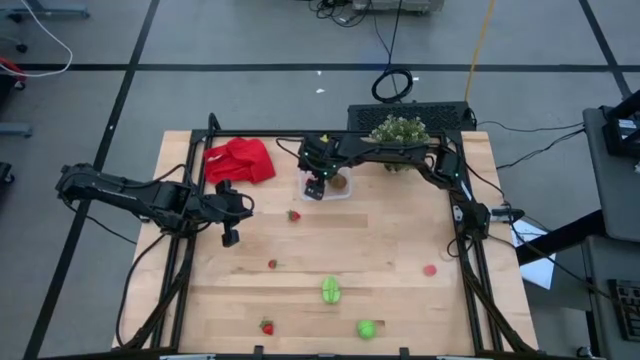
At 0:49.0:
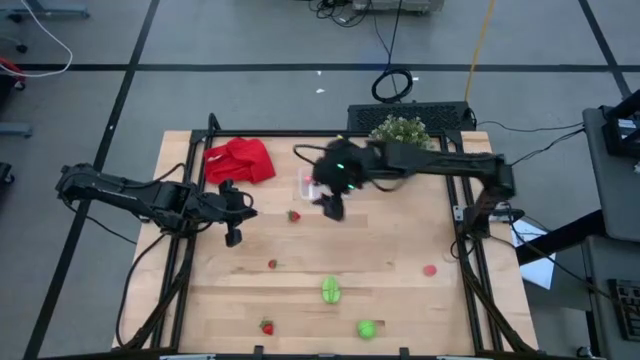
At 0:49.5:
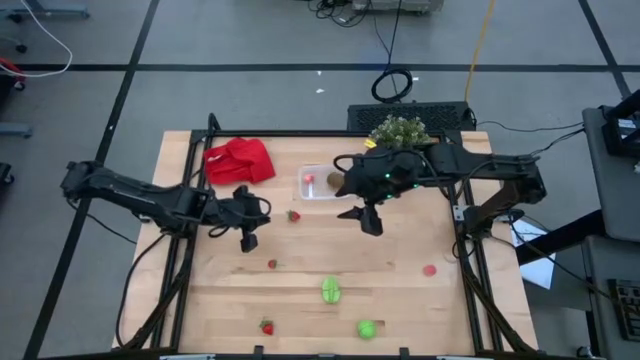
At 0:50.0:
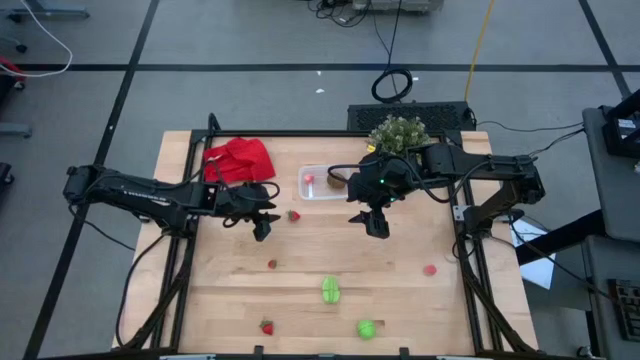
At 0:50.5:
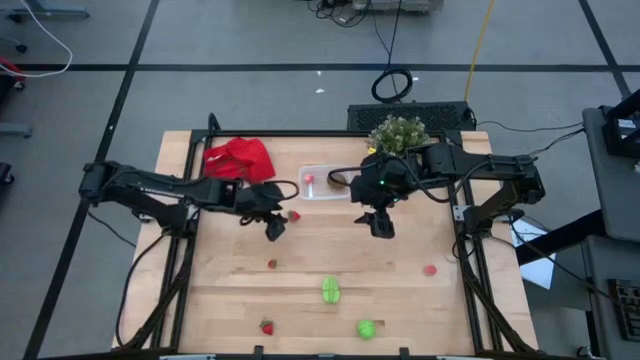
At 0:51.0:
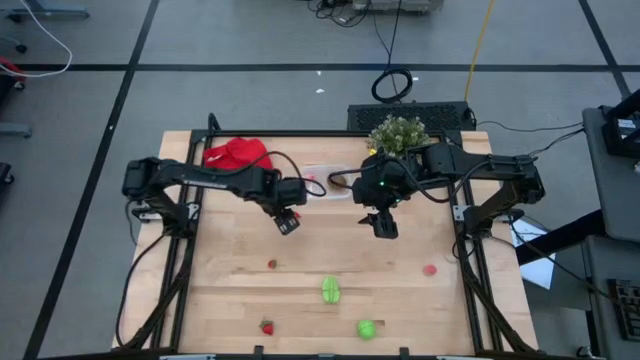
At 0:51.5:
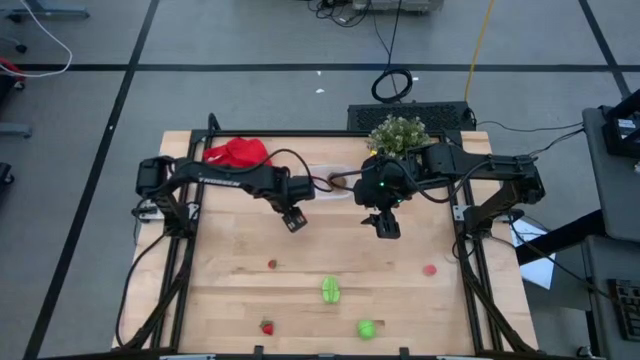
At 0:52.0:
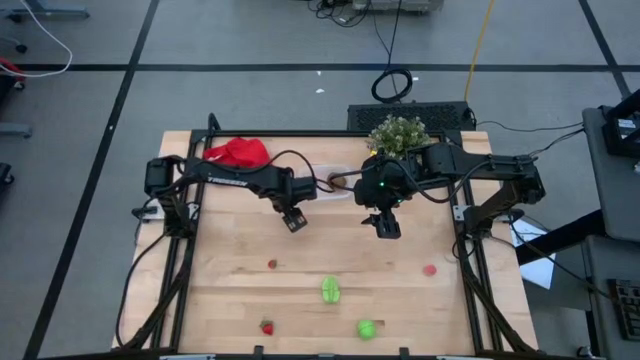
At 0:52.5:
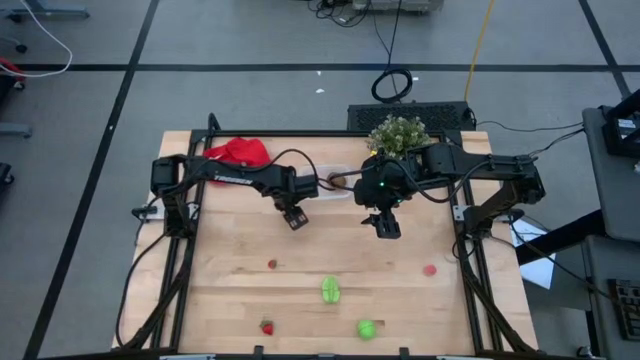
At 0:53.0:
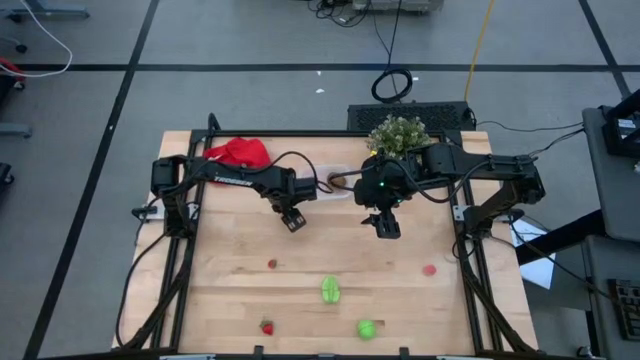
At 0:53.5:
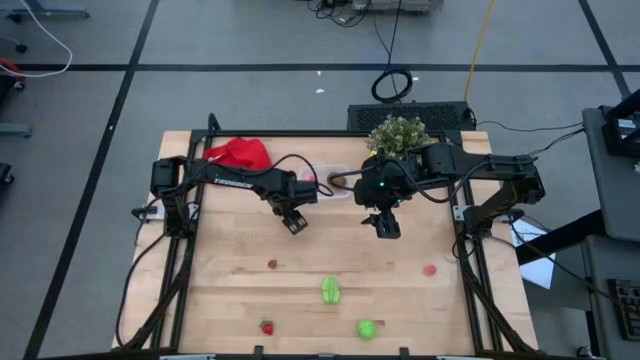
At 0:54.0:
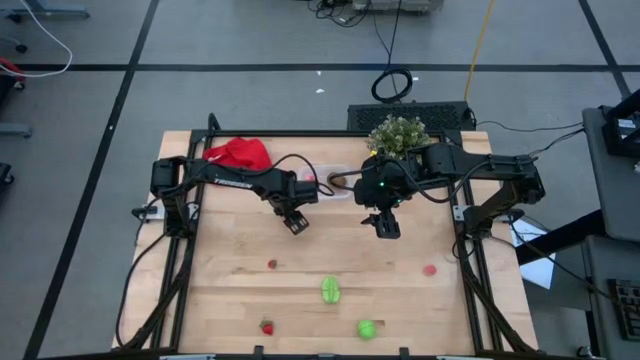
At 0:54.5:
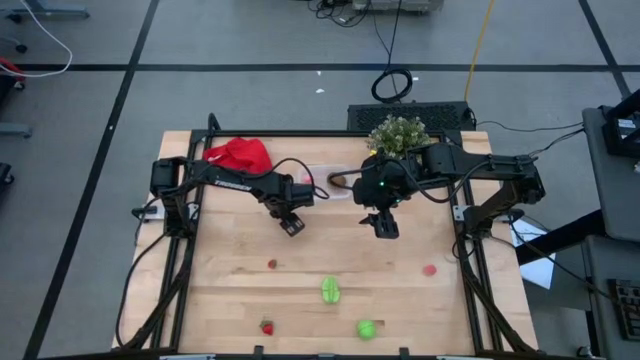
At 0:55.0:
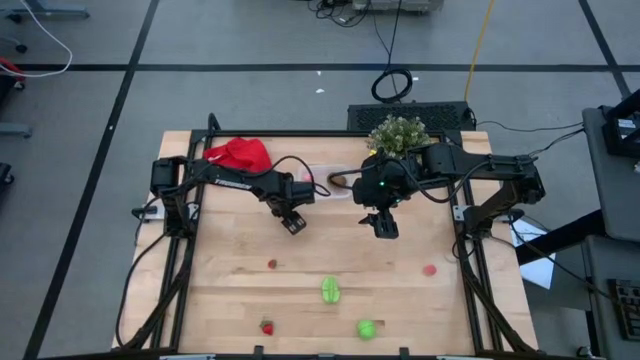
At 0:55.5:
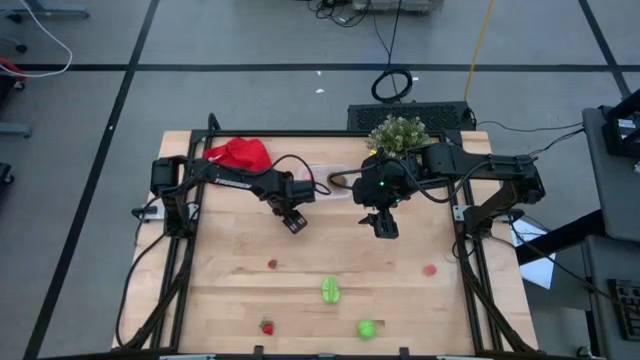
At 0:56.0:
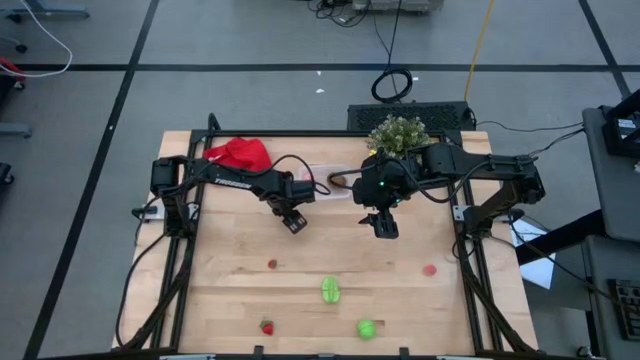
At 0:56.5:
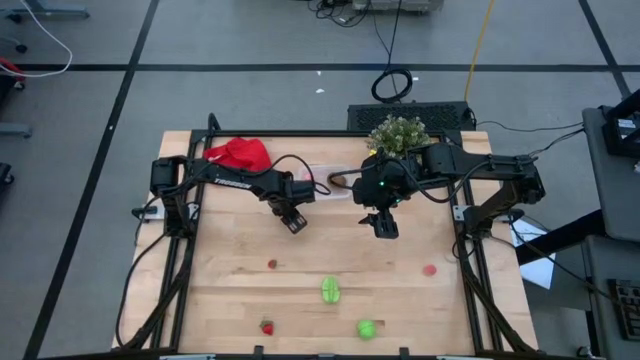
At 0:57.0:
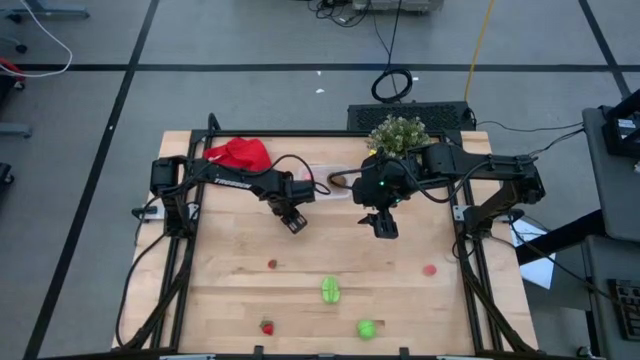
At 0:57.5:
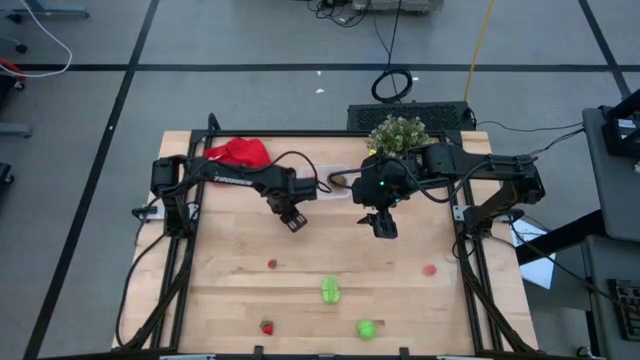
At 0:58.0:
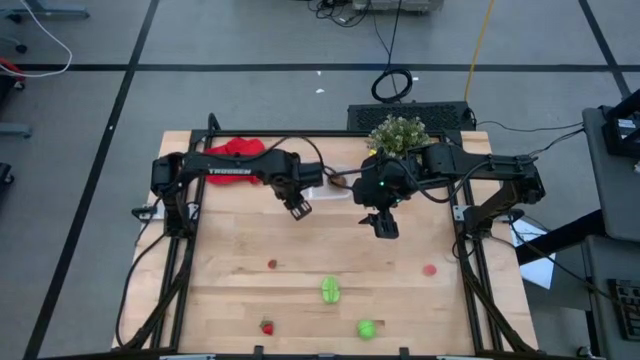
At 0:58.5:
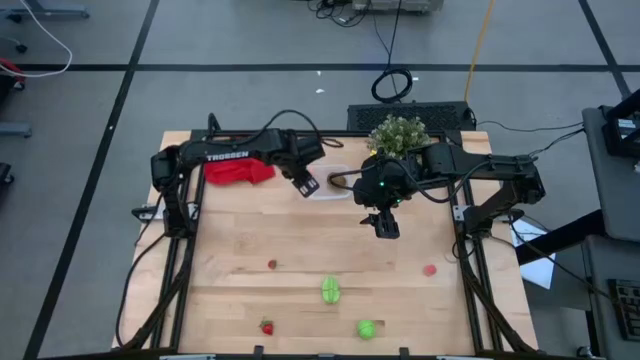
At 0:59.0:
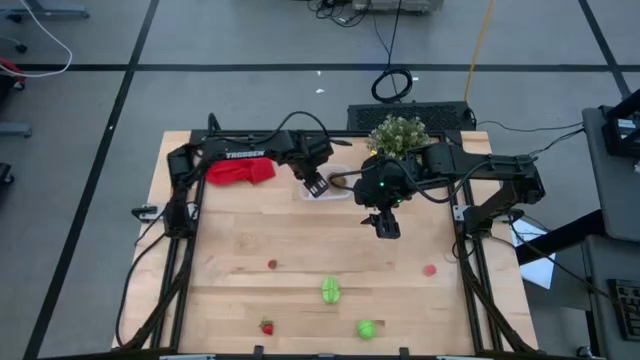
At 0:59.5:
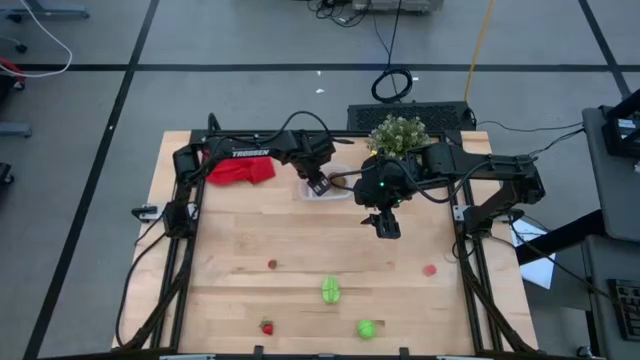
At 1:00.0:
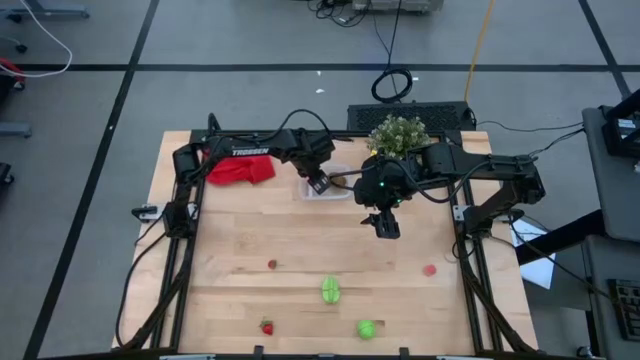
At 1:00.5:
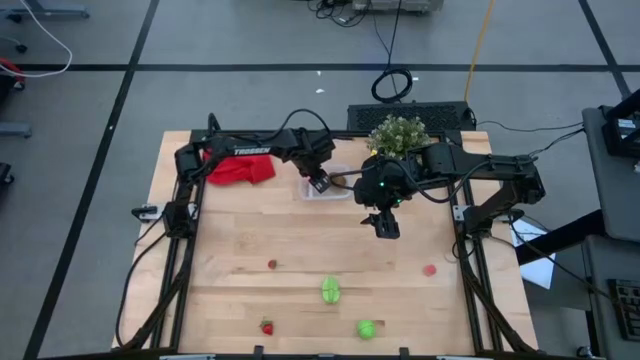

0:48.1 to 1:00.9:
Task: Pick and placing Produce into tupperware
Put the top strawberry into the bin

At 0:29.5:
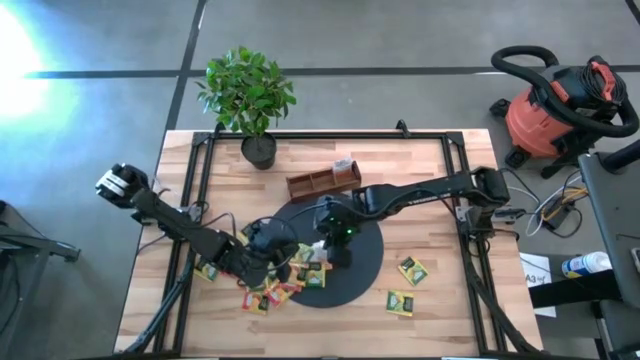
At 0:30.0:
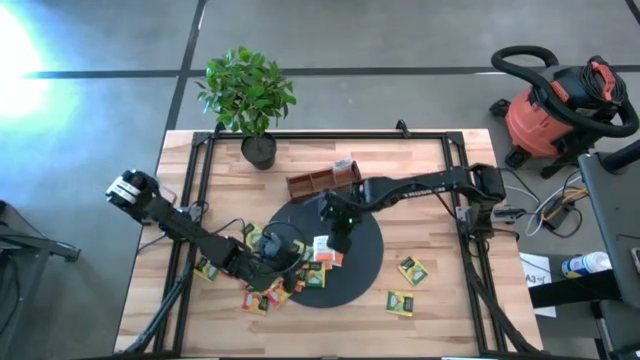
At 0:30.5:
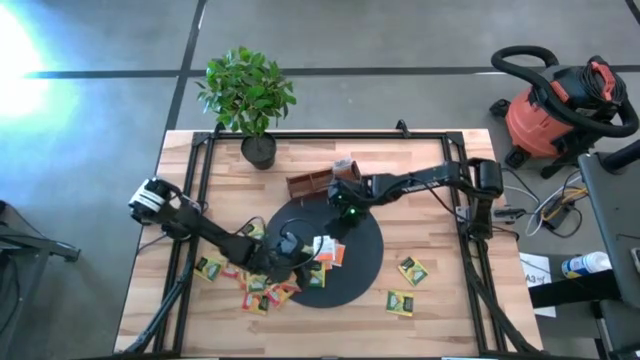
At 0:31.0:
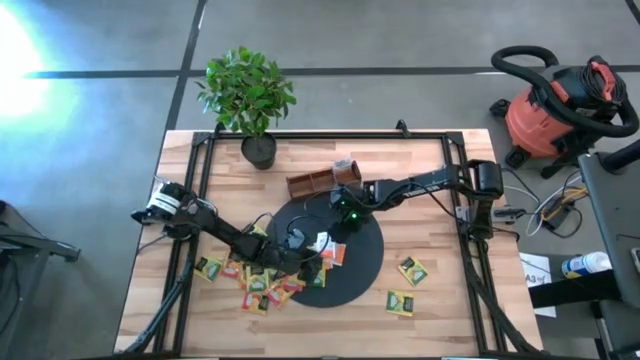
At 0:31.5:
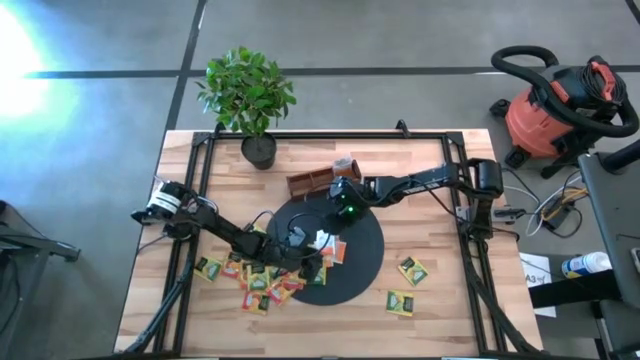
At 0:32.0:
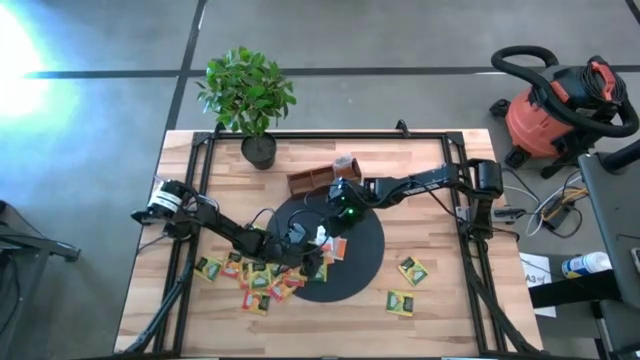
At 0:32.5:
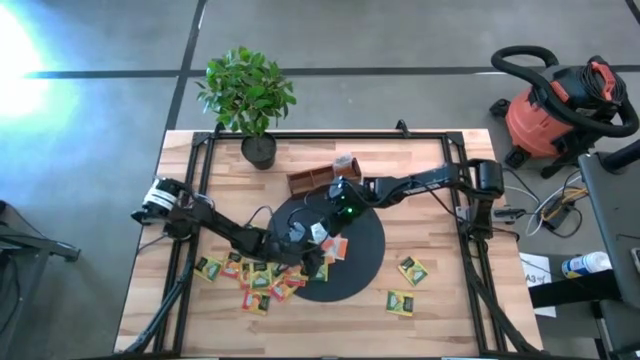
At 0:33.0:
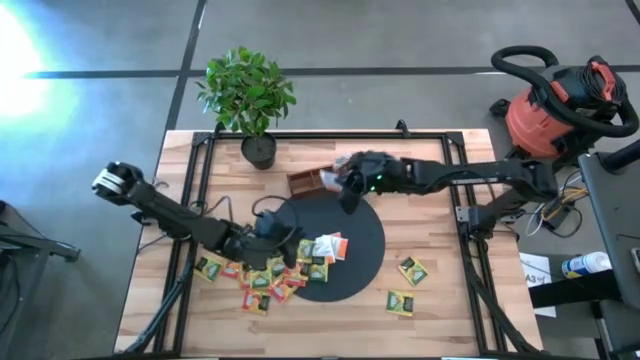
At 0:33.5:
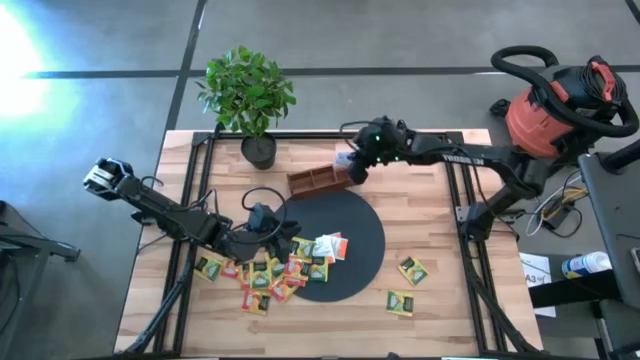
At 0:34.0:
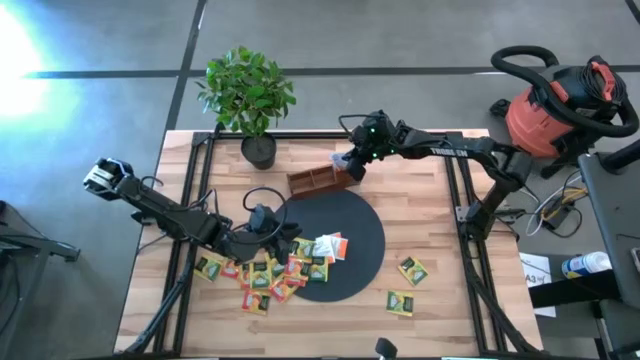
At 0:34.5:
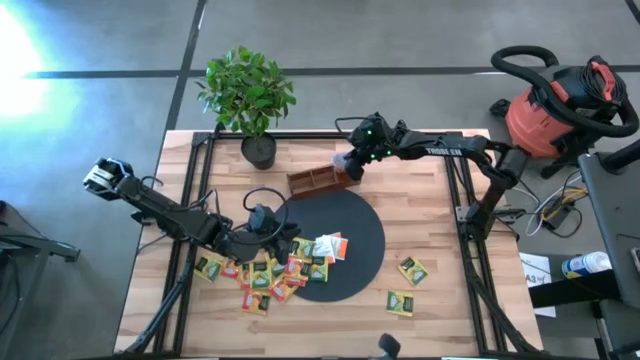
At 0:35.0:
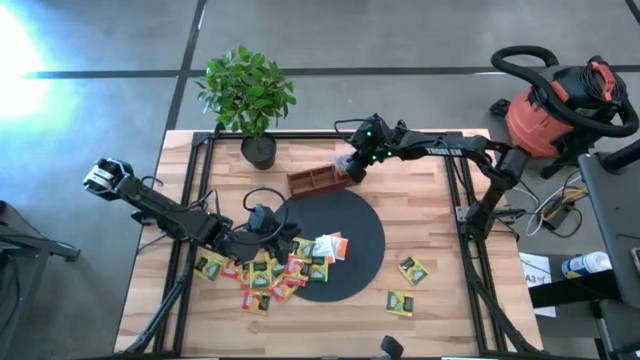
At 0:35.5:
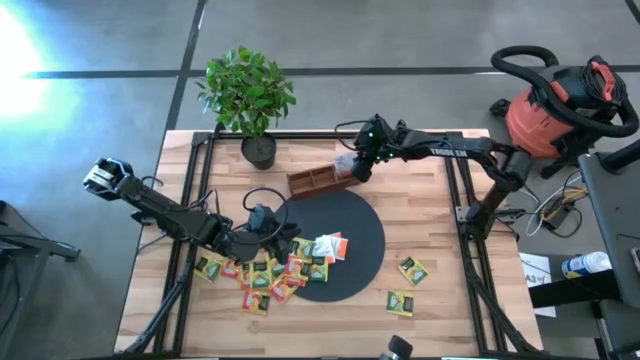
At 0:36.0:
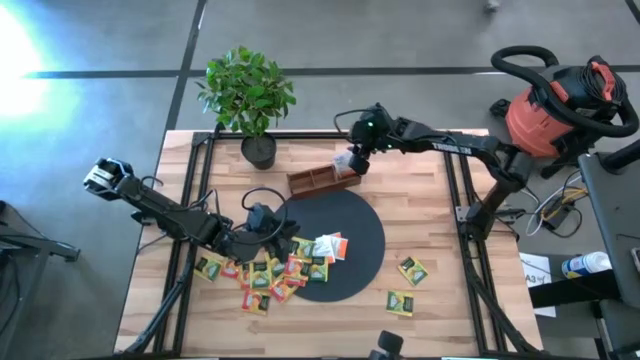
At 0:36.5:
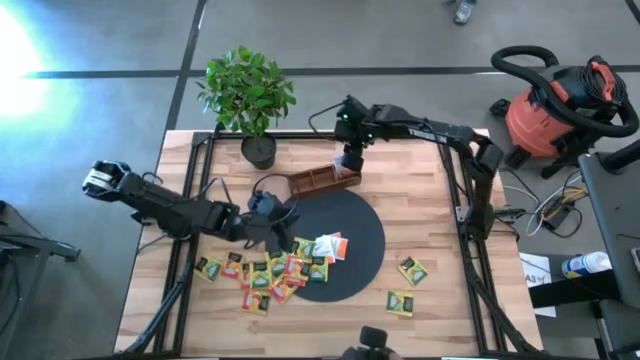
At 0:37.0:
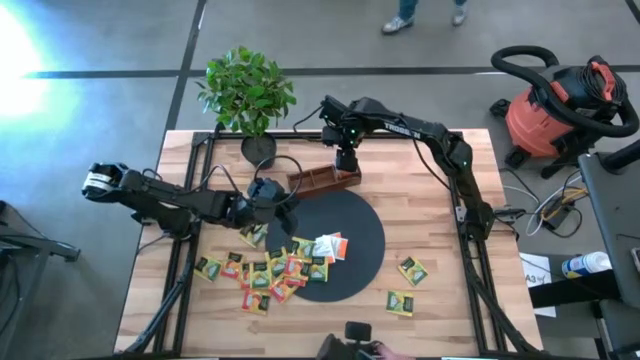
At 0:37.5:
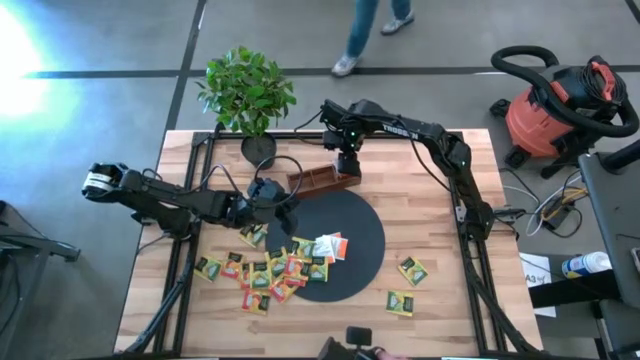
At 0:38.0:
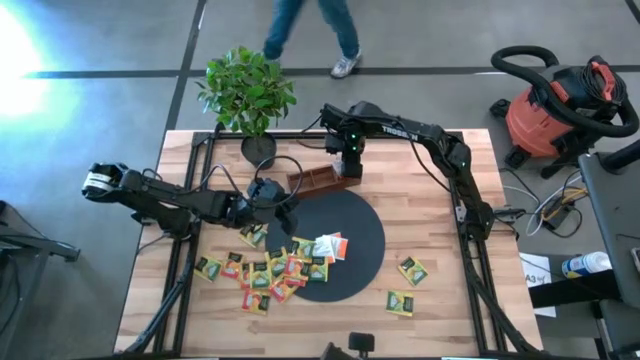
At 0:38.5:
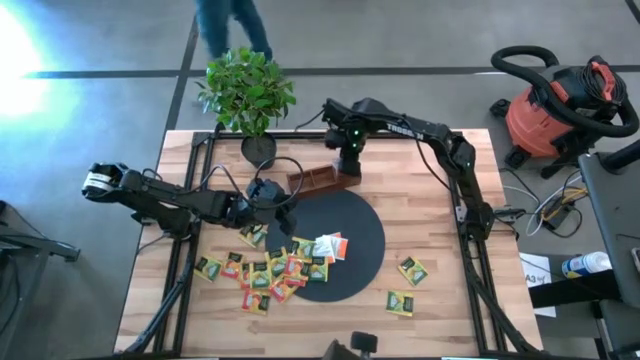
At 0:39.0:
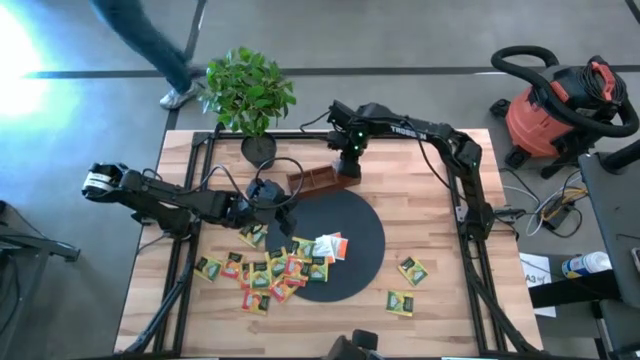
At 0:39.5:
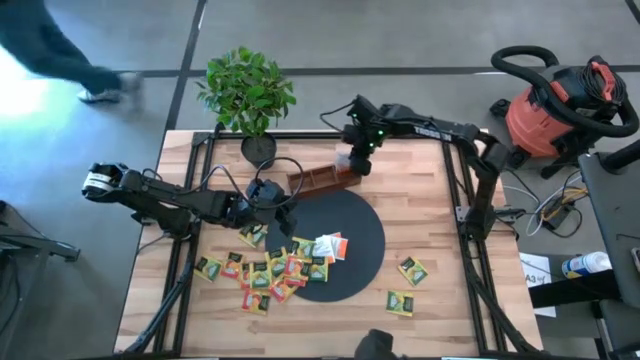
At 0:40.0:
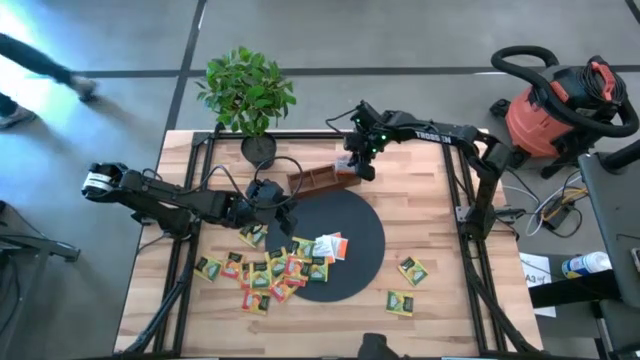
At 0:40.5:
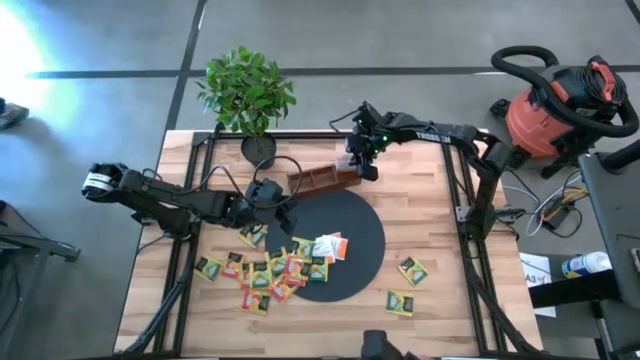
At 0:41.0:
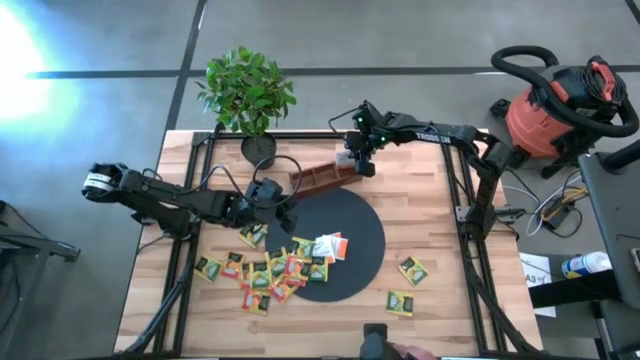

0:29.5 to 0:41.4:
Task: Pick & Place Tea
Put the white tea bag into the right slot of the wooden organizer
